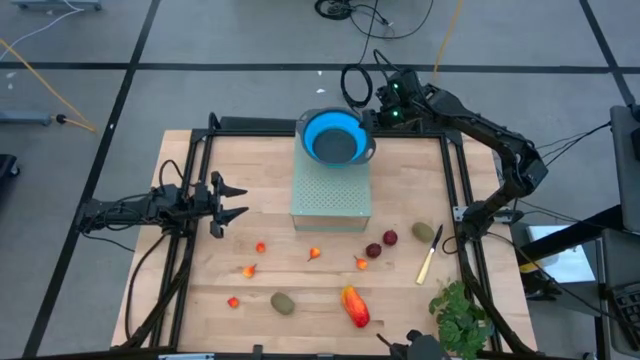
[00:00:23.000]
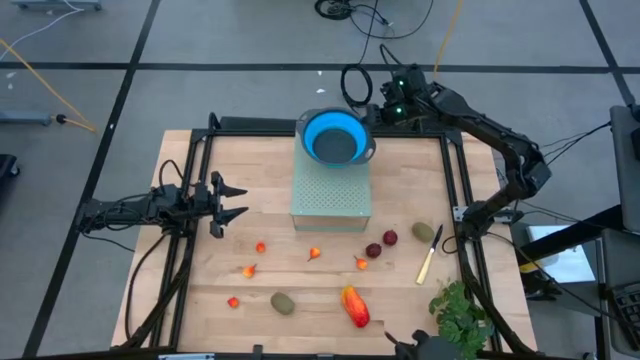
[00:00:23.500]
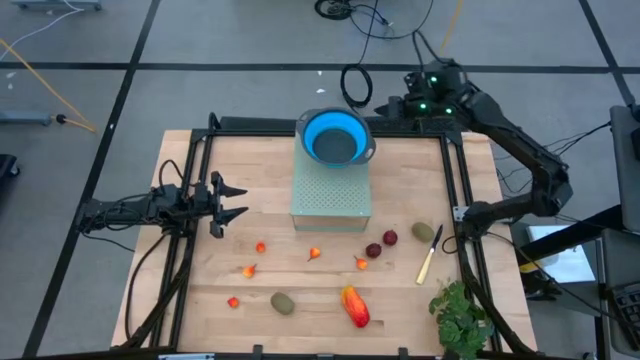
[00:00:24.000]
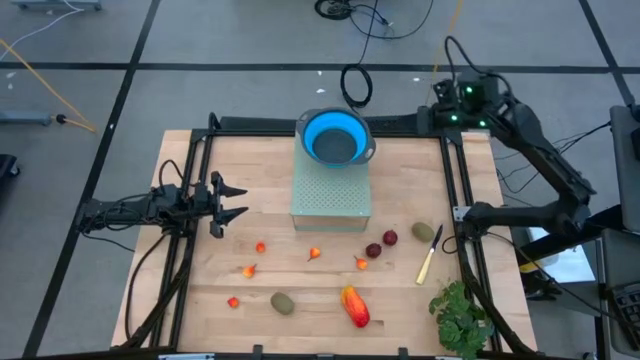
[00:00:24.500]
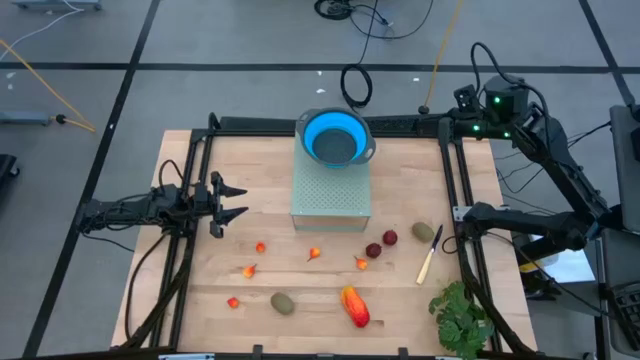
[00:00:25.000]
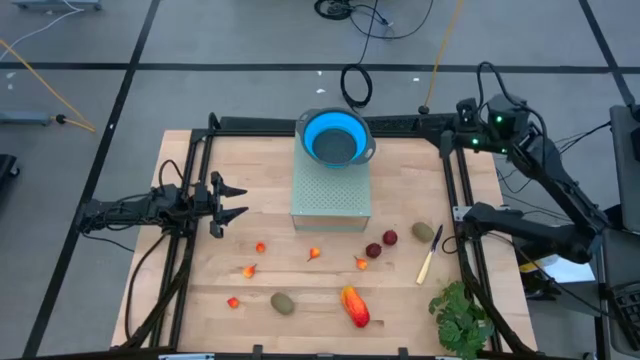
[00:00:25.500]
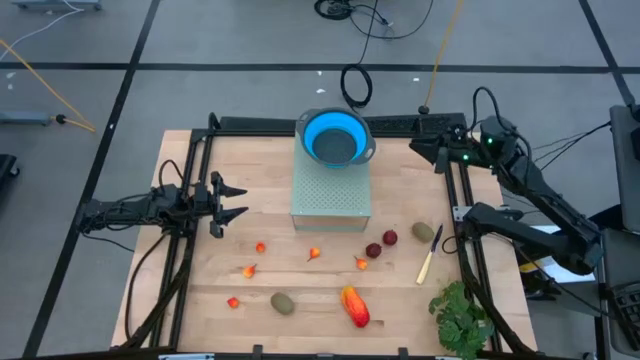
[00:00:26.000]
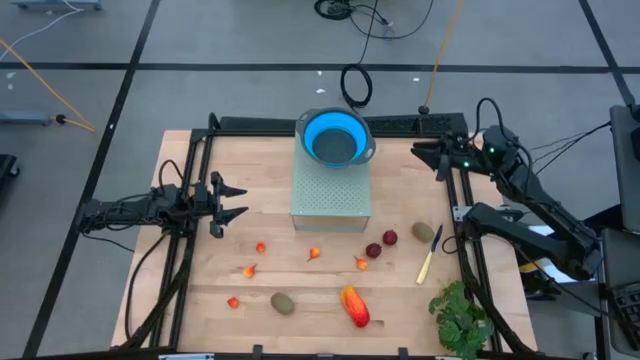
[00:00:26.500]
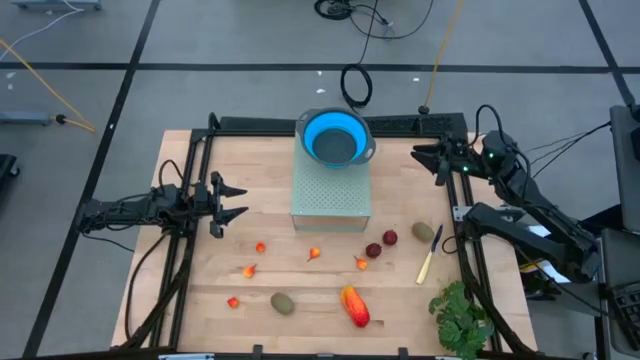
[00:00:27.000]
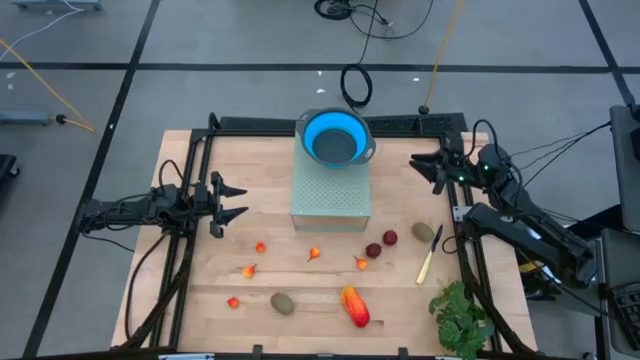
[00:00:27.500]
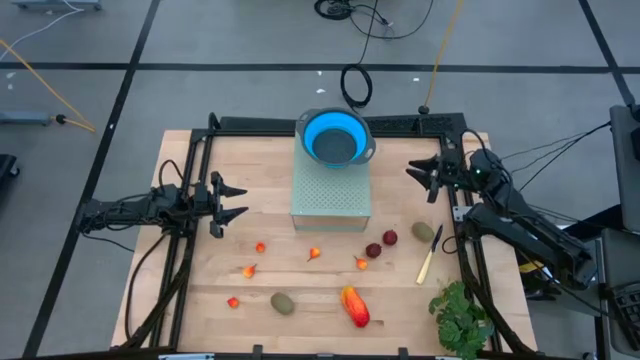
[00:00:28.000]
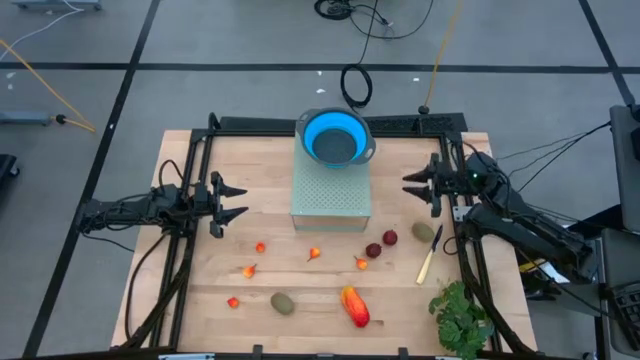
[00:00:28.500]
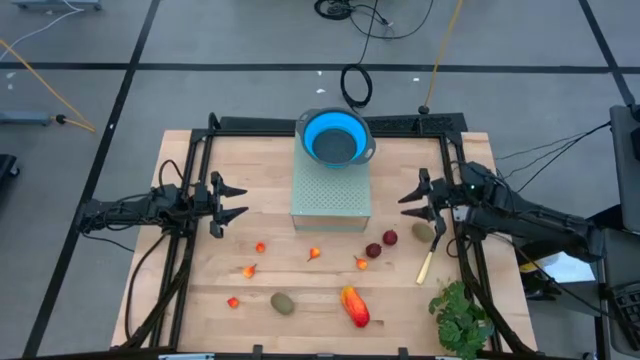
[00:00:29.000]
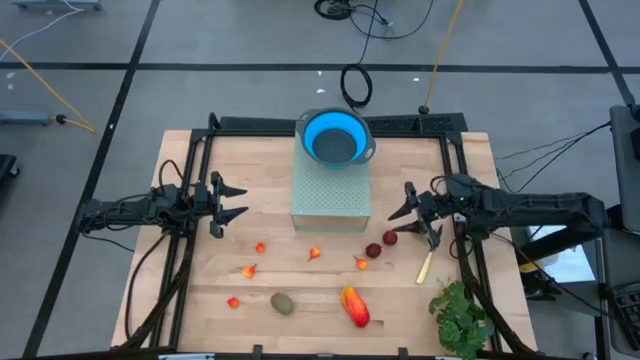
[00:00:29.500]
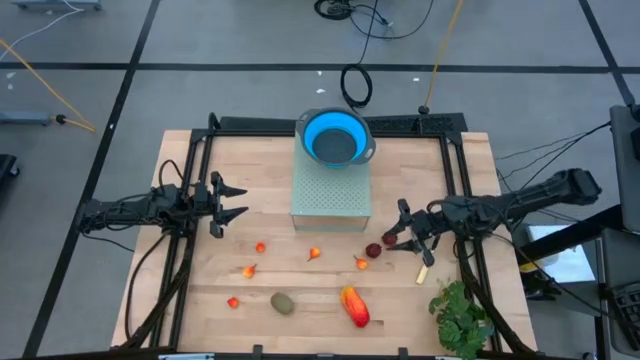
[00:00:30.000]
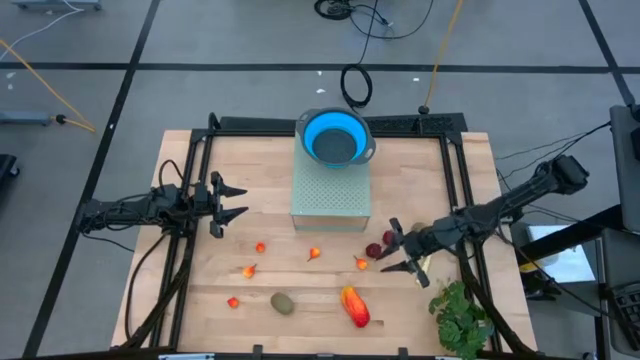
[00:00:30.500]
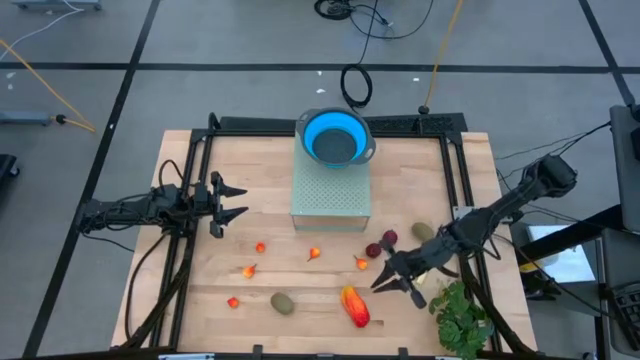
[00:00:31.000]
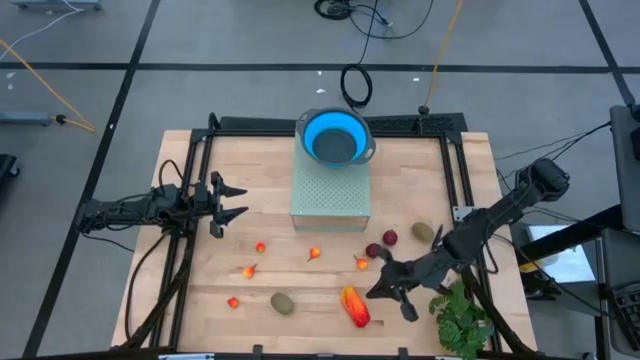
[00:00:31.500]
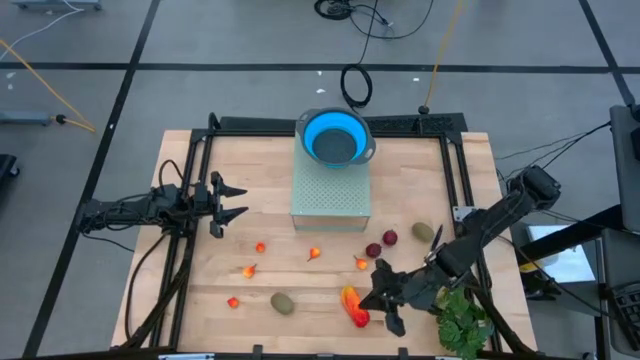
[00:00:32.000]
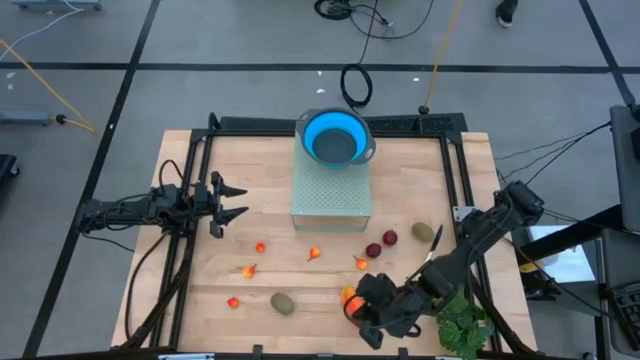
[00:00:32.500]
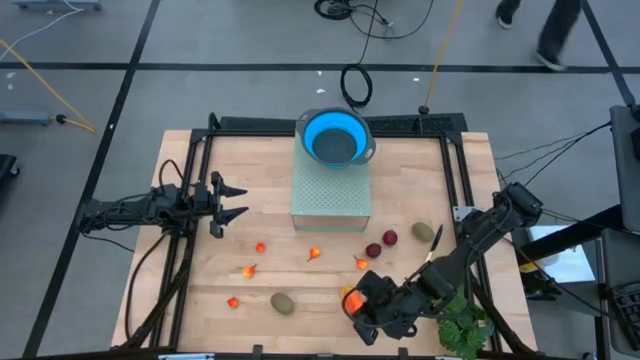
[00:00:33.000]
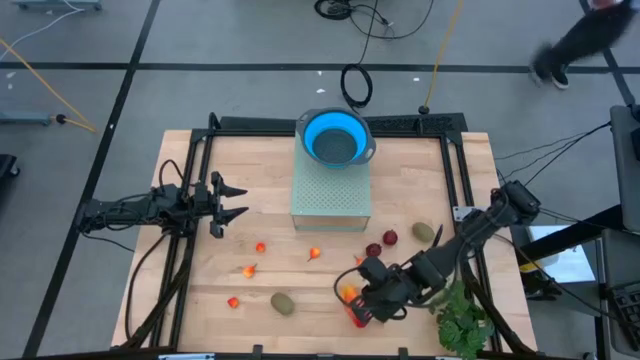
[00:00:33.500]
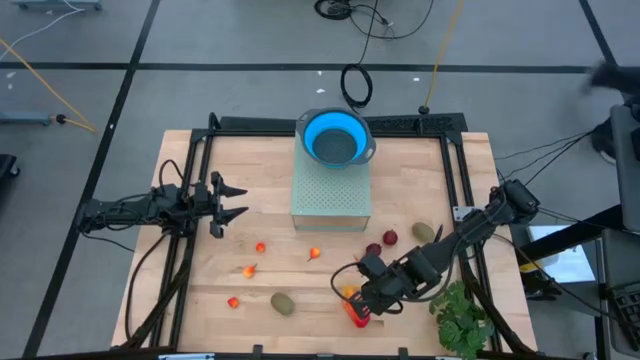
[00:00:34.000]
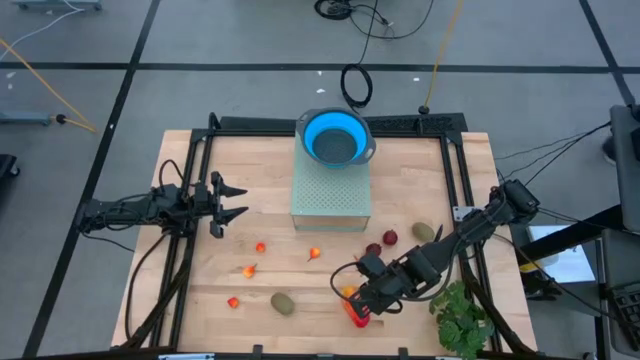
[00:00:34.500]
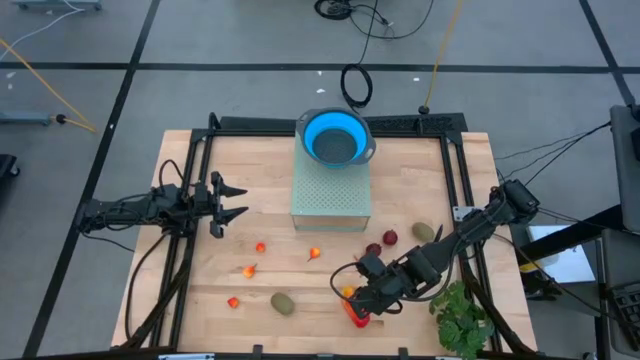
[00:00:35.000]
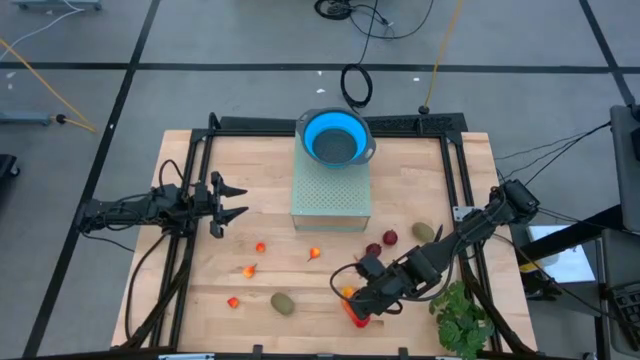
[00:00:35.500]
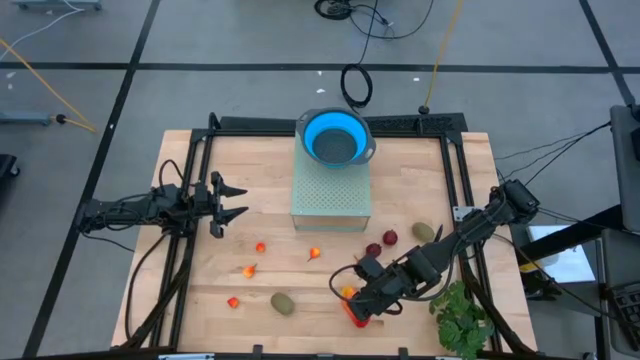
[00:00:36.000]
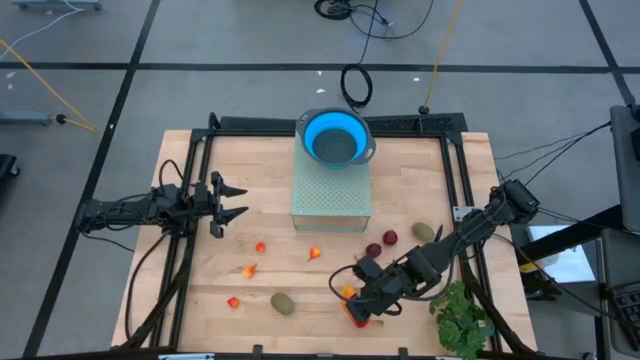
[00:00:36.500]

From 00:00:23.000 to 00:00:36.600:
Task: Pick & Place Fruit
Put the mango into the blue strainer bowl on the shelf

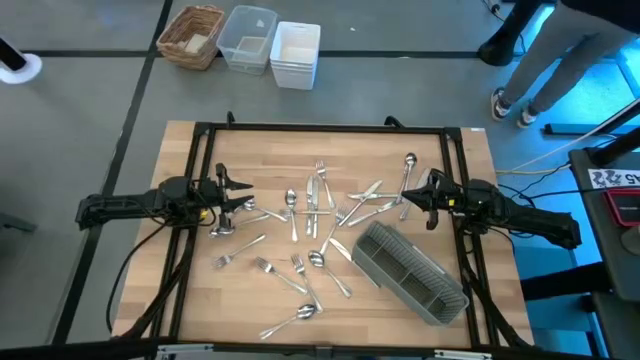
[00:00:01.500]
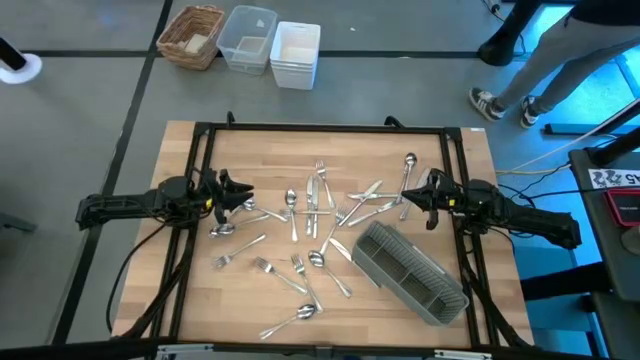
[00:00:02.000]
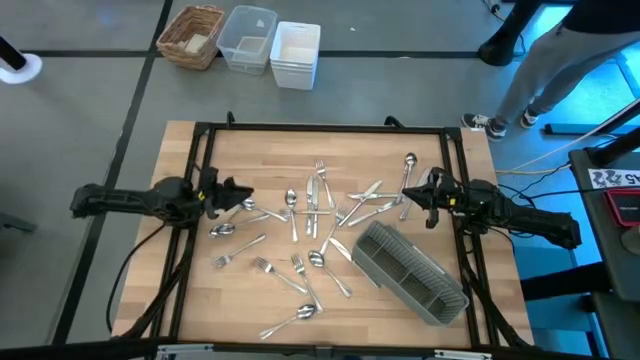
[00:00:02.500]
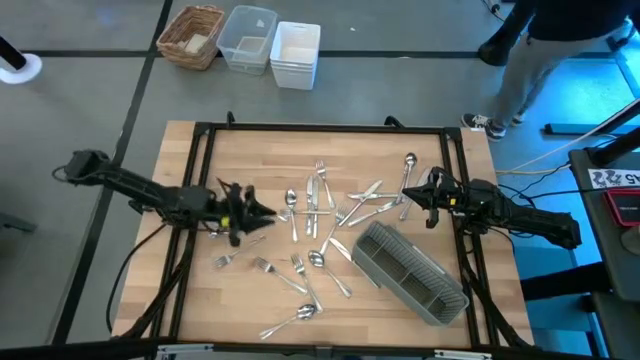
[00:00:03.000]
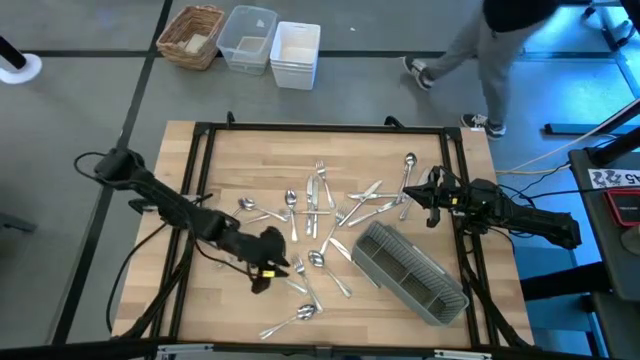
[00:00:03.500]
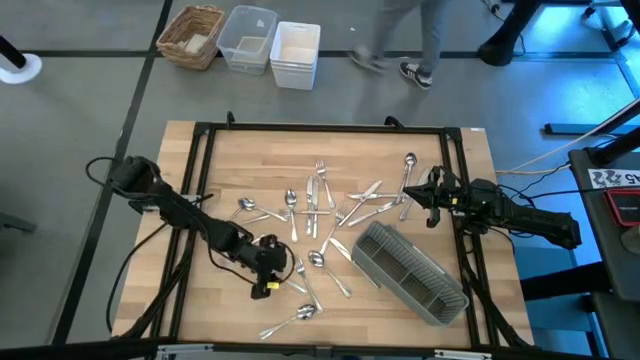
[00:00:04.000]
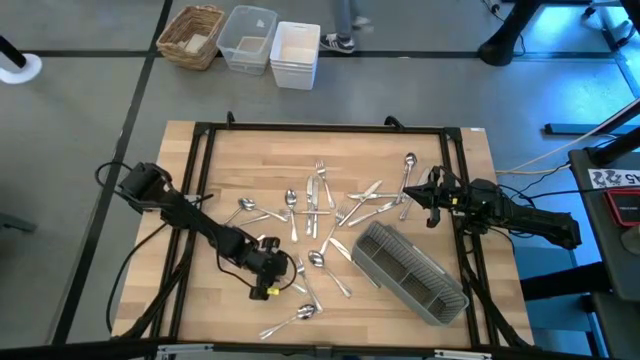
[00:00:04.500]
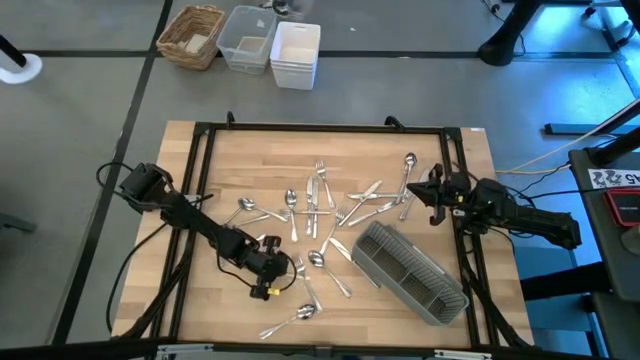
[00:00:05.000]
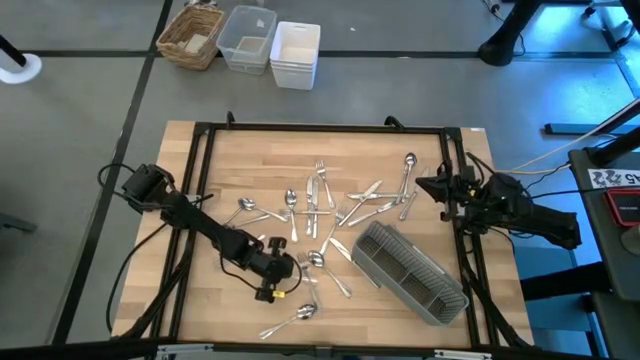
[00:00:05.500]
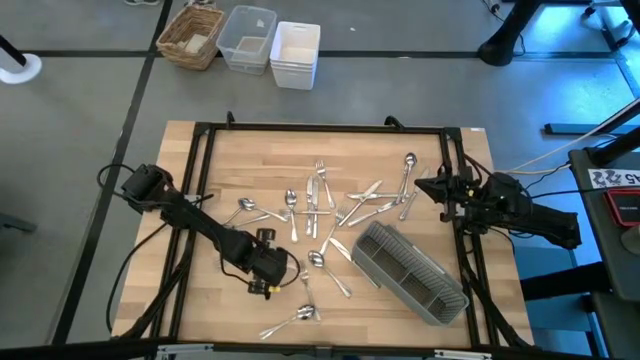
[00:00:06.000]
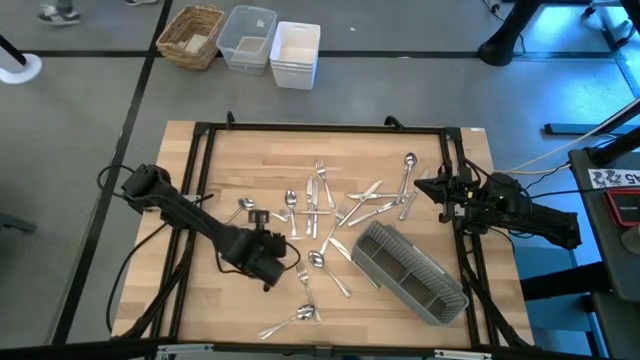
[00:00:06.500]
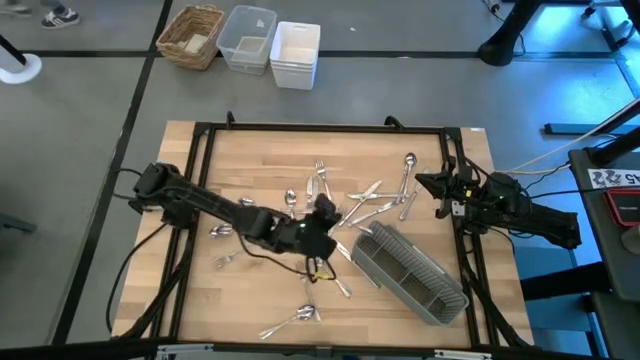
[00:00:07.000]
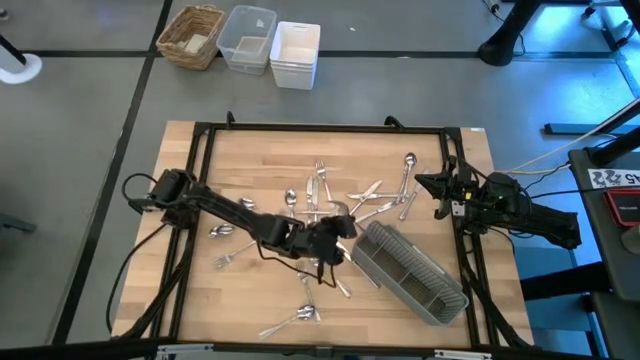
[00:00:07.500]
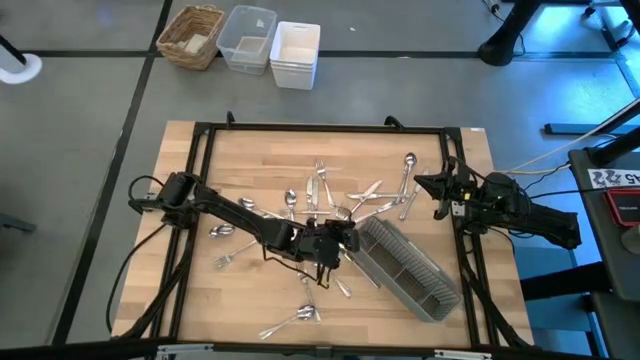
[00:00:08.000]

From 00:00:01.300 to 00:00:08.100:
Task: Sort silverware
Put the silver fork into the gray silverware basket
